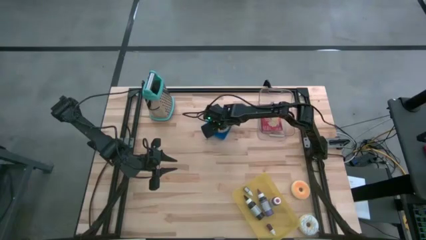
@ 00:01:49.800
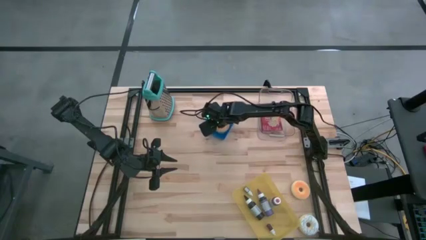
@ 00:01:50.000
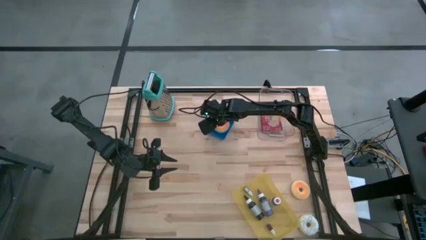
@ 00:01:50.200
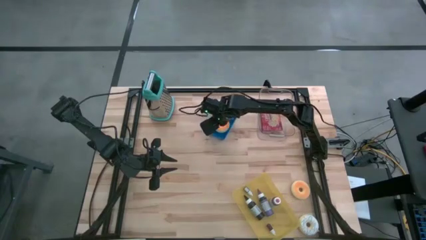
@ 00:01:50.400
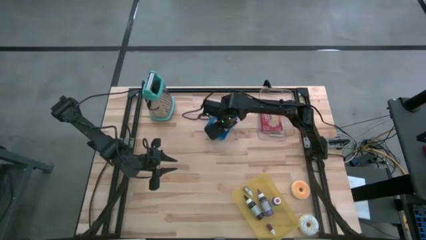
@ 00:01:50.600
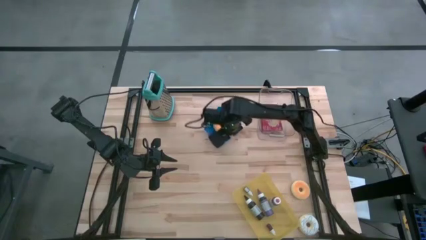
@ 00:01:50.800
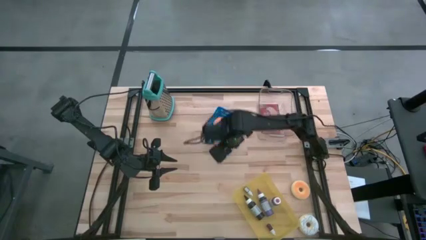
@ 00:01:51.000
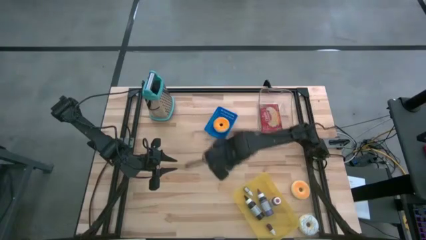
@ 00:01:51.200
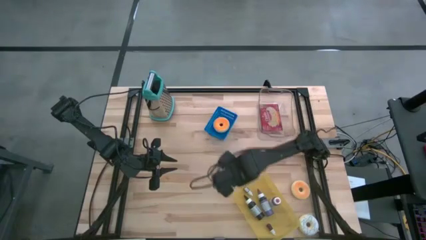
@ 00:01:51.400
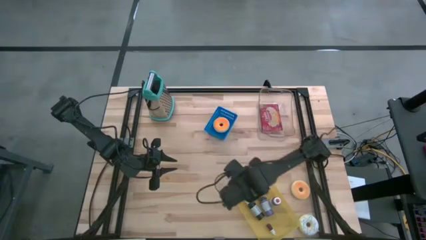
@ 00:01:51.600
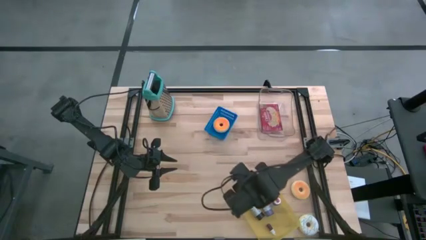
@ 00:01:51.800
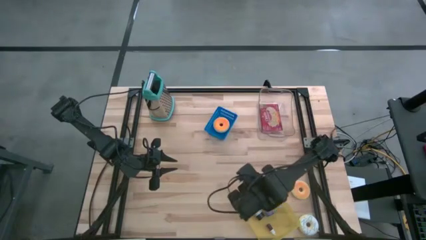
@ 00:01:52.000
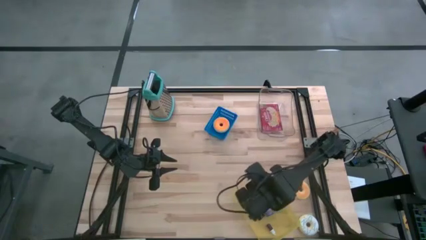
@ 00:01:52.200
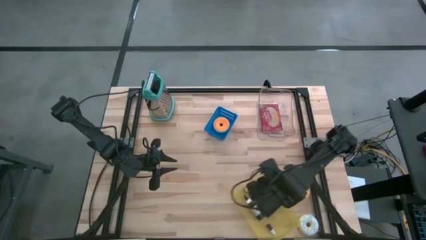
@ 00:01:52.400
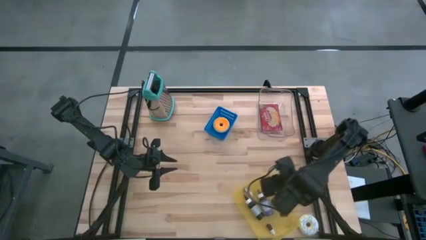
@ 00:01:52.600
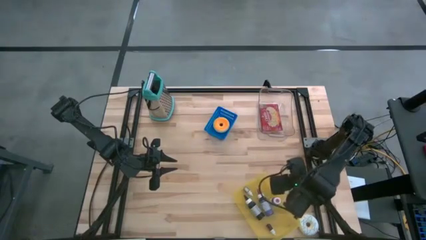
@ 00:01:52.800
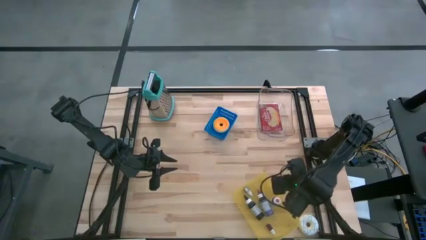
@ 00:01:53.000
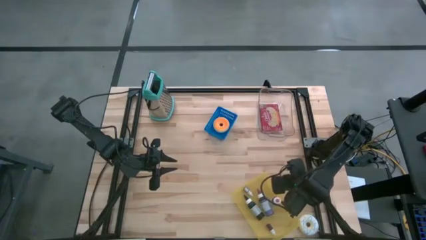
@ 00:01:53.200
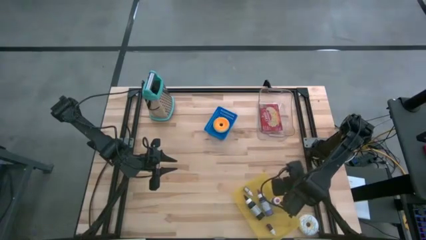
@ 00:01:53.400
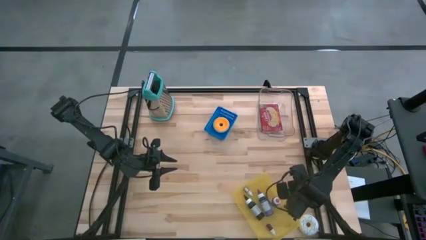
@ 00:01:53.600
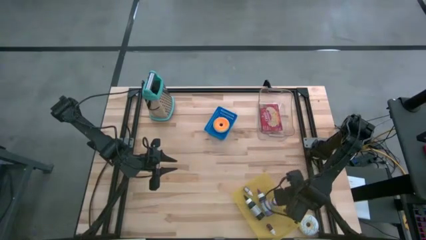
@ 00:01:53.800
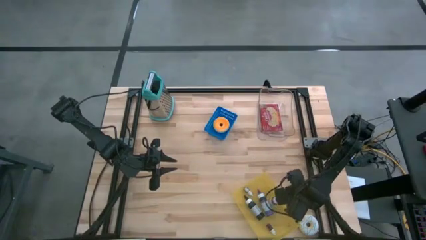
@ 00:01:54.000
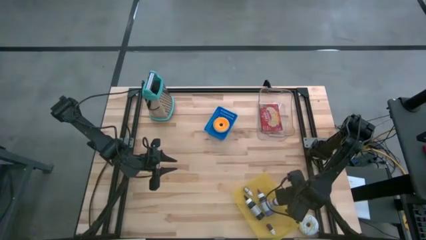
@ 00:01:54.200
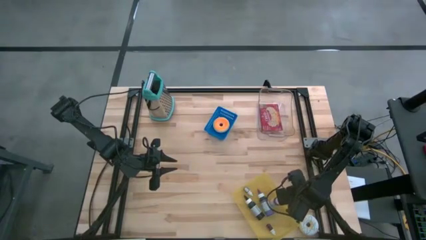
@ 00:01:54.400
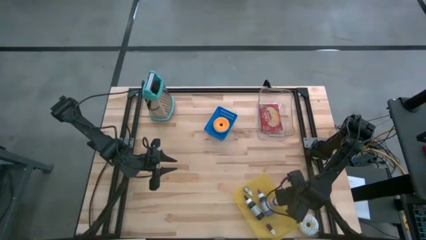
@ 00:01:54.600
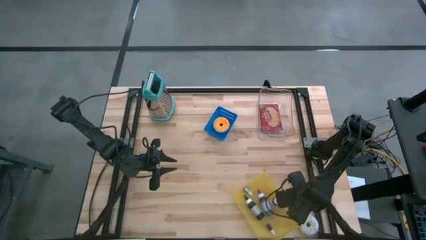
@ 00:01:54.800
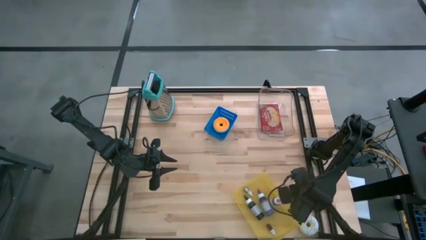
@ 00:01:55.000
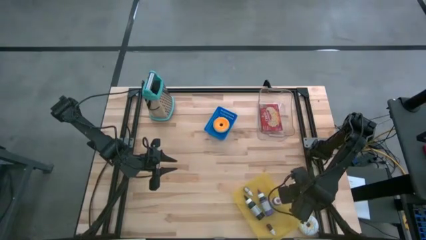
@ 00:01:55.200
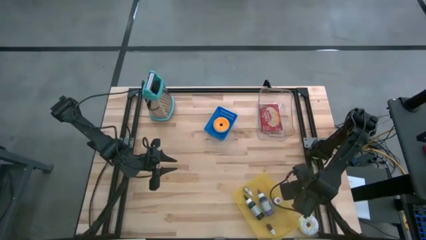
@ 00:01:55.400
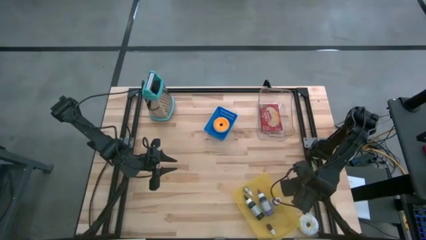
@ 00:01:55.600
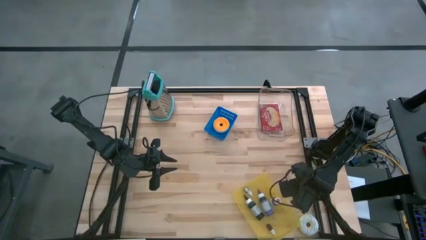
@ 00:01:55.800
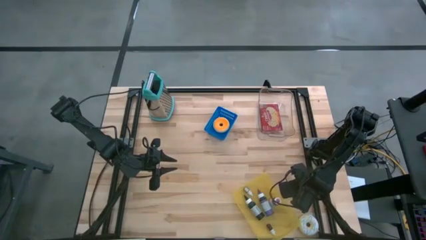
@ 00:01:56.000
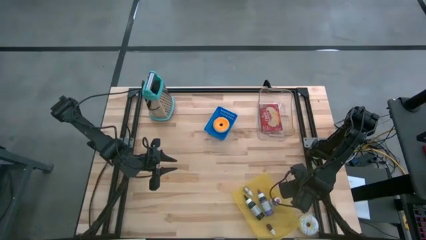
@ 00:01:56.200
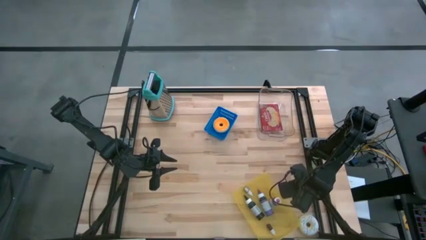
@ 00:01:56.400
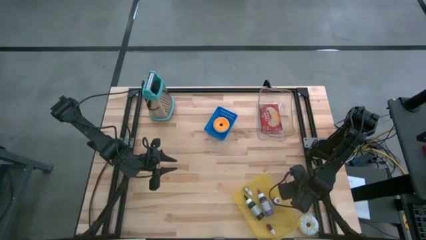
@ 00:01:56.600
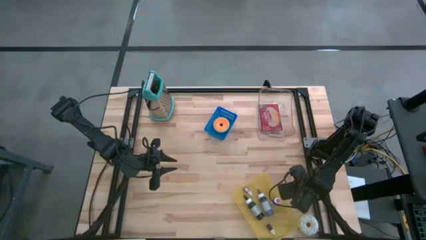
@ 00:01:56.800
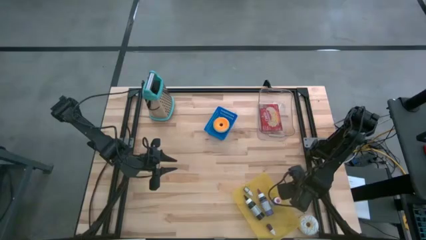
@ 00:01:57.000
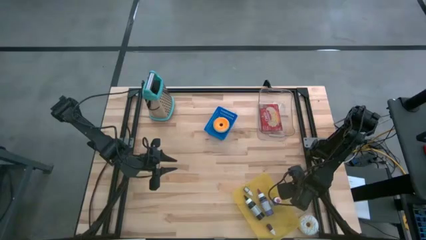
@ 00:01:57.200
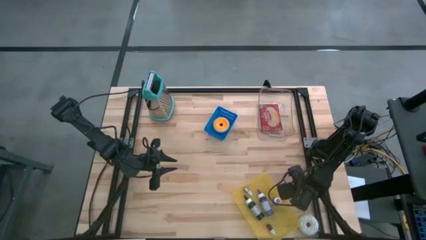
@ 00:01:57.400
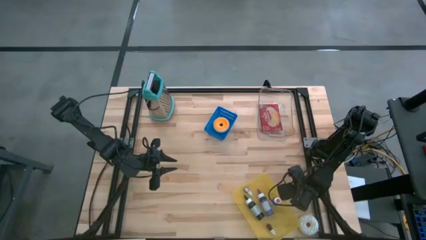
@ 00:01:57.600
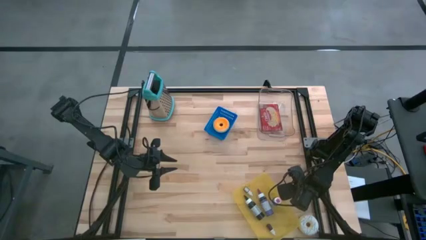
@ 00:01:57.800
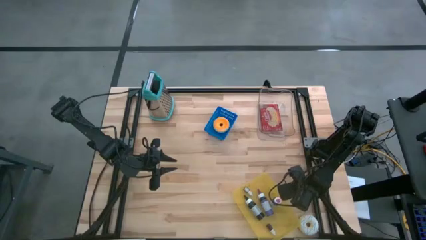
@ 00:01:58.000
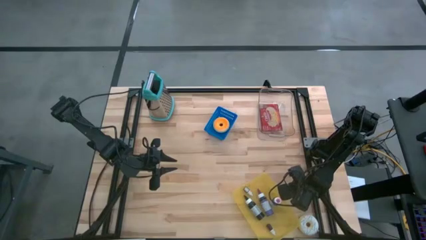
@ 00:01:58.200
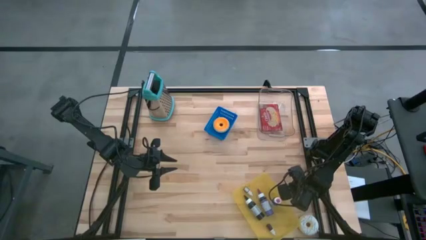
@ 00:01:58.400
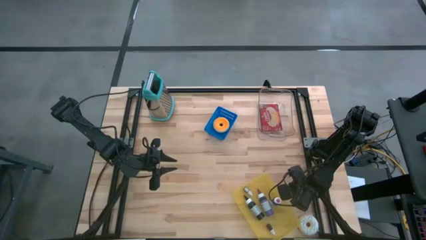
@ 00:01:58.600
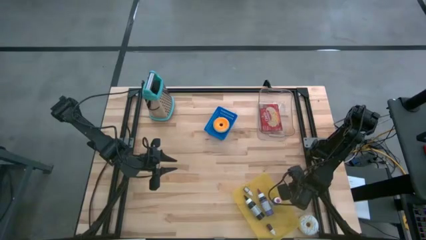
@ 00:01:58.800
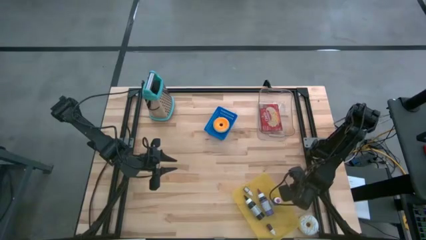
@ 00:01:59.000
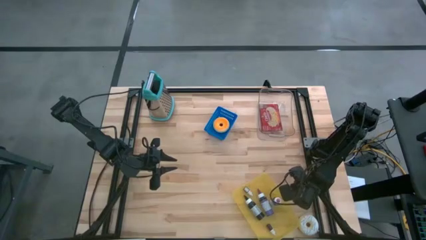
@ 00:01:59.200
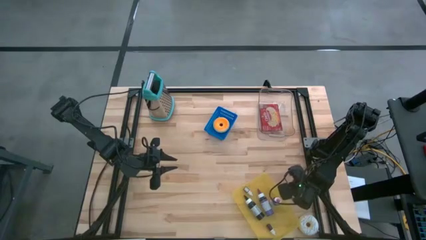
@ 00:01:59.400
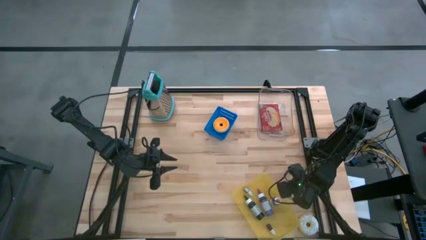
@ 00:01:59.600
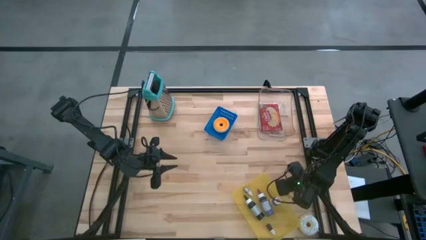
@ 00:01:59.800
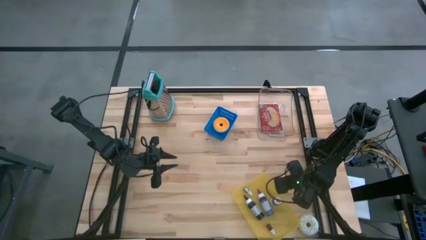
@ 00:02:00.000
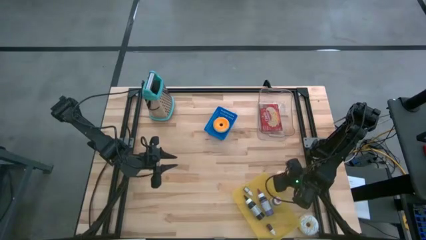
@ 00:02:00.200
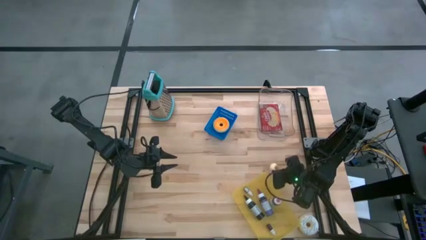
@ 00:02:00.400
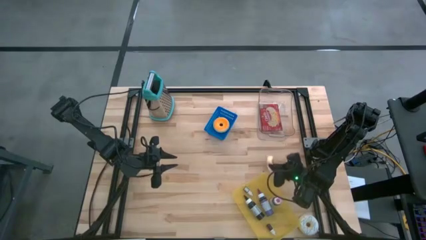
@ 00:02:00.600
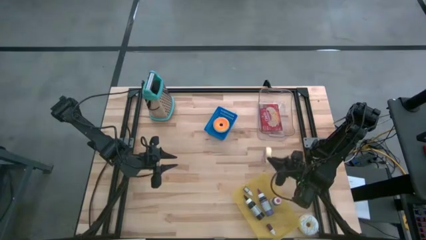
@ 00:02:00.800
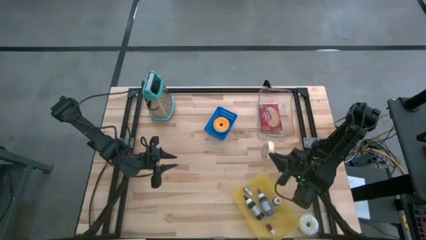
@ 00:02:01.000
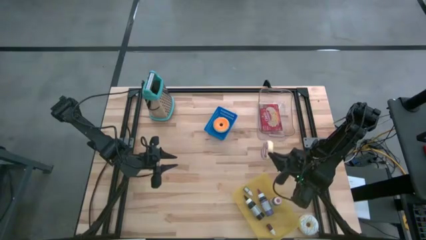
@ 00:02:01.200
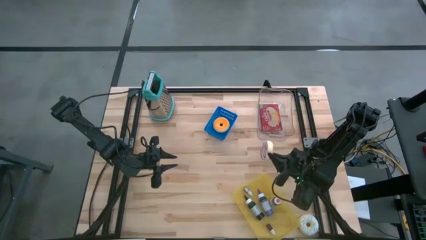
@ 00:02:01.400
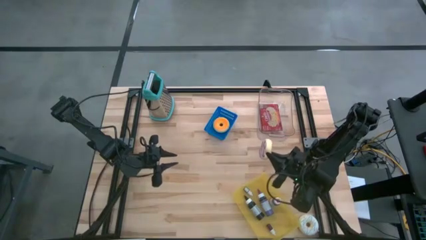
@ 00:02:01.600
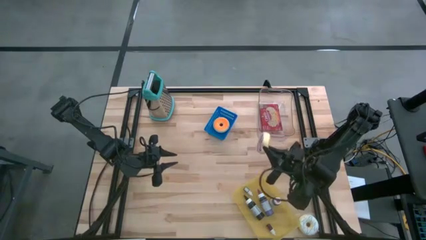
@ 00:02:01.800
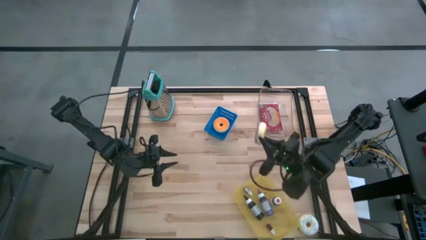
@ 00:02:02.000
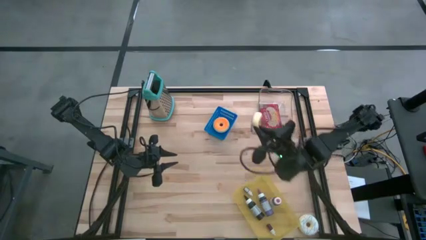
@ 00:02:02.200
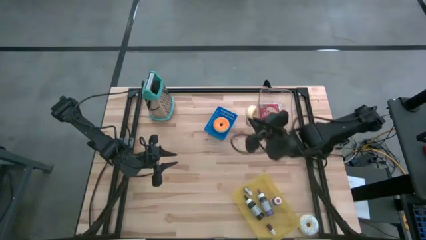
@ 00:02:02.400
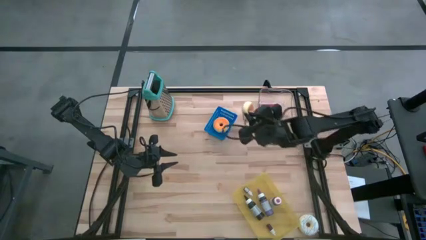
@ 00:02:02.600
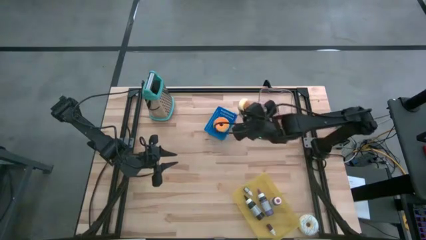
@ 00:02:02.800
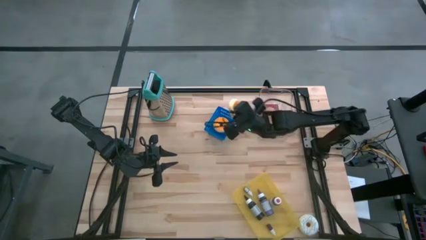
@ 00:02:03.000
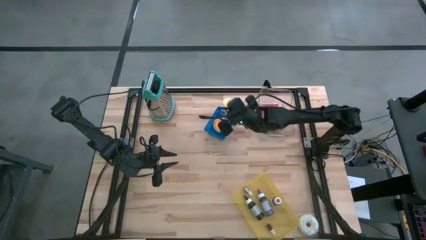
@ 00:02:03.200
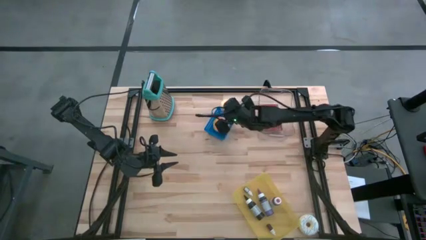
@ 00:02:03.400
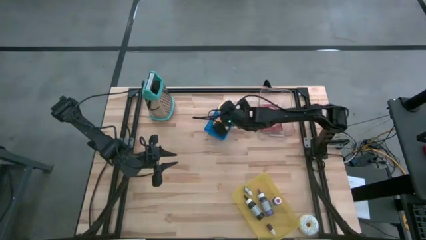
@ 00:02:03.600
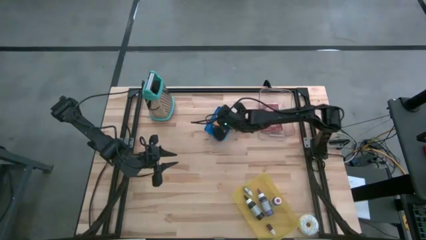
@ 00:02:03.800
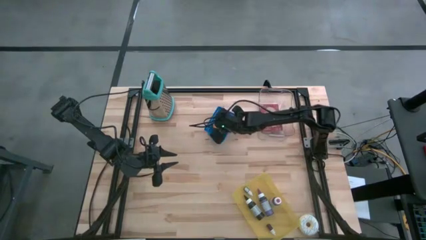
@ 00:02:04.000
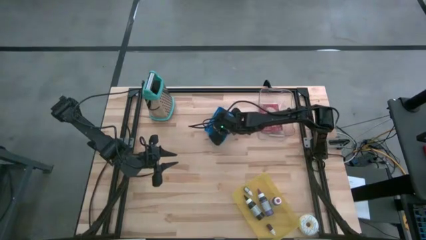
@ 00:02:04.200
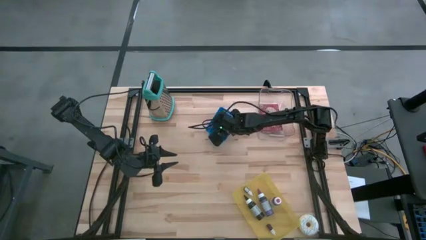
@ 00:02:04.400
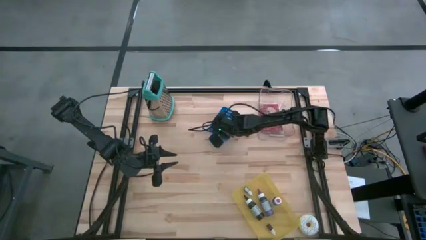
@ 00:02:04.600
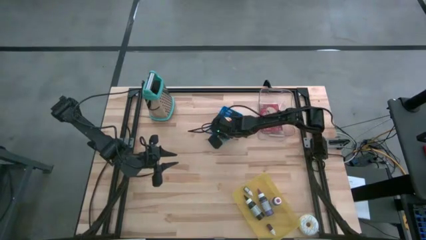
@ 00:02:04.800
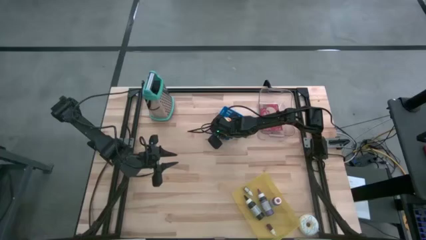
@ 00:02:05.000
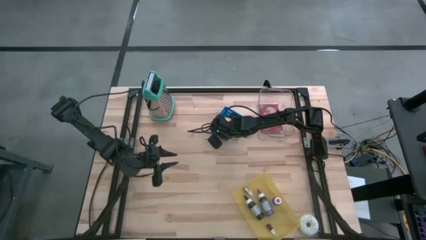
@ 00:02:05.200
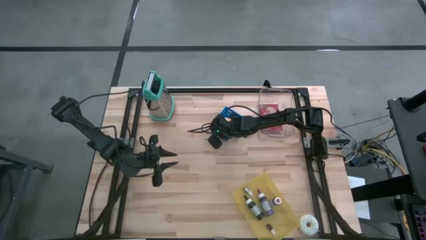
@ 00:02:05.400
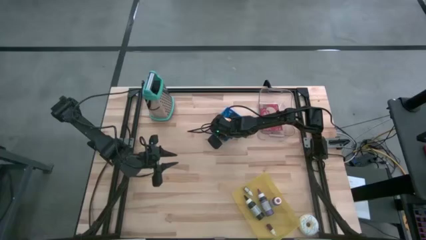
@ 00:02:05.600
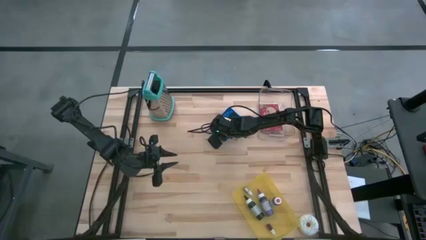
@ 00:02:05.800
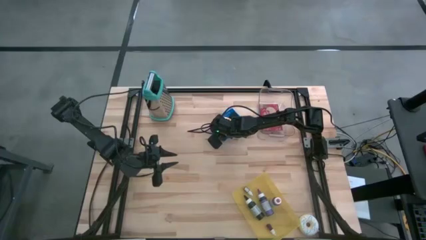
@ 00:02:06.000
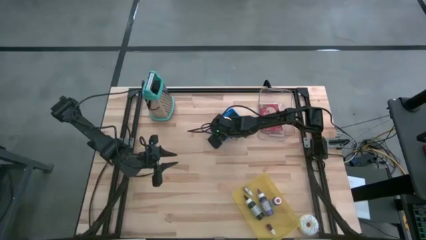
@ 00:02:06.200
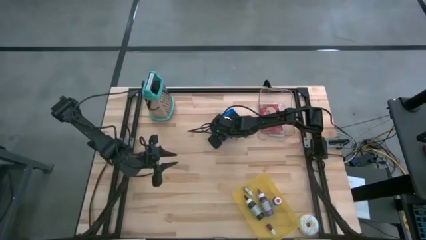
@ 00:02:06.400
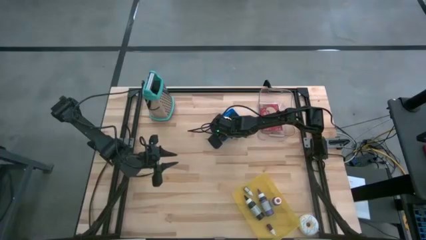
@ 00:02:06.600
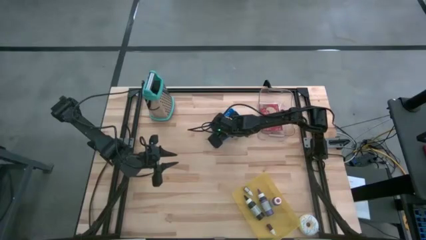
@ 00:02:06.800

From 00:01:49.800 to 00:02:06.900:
Task: Pick & Place Food Item
Stack the top orange donut on top of the top left orange donut in the blue bin
